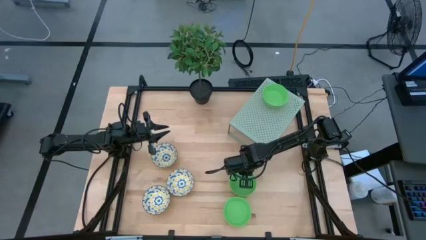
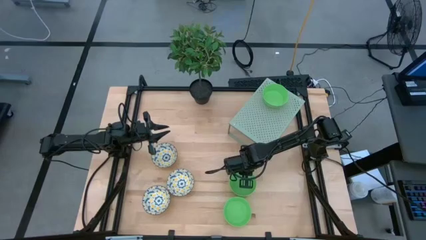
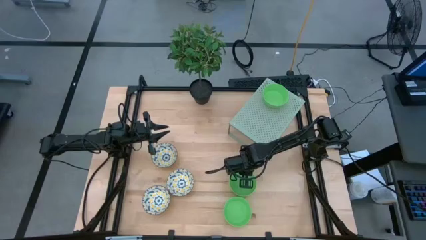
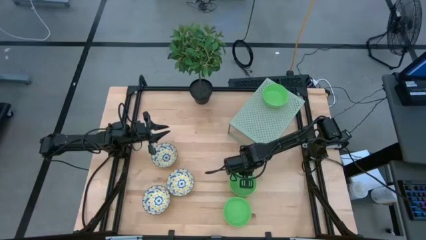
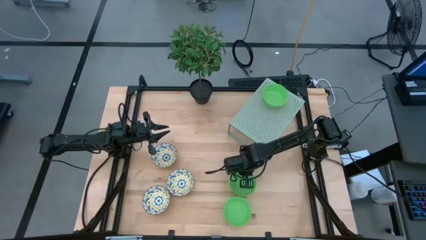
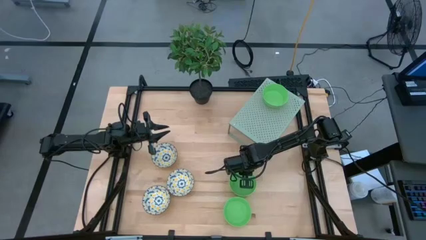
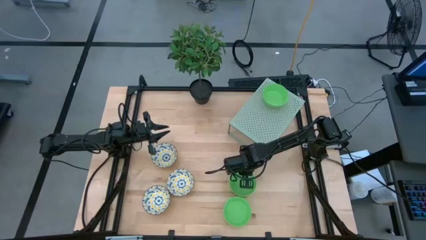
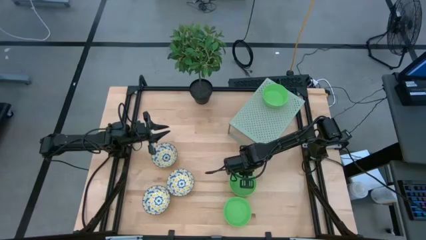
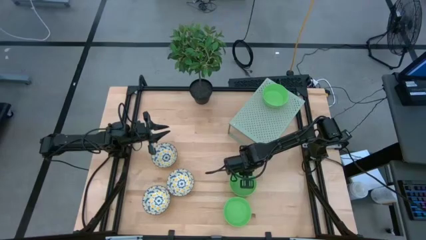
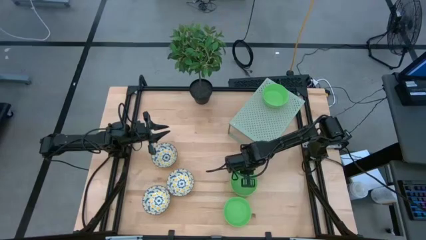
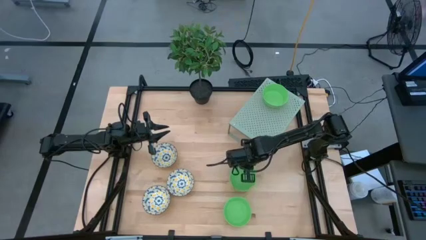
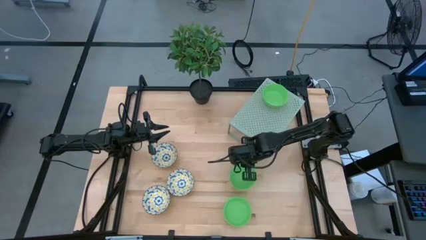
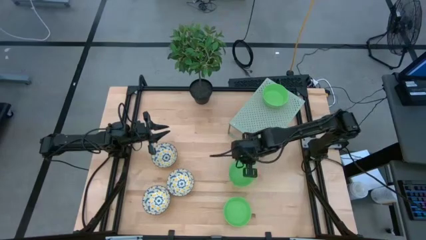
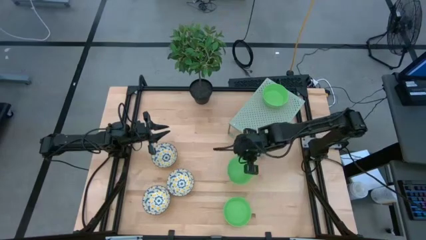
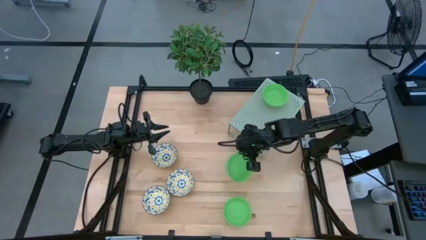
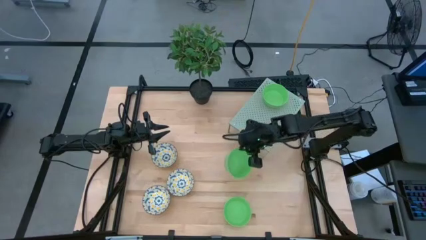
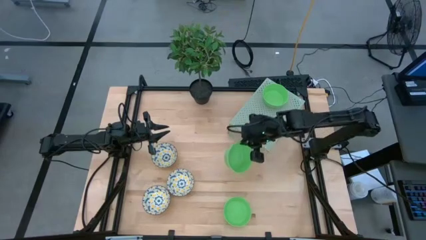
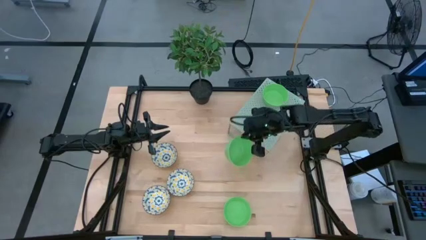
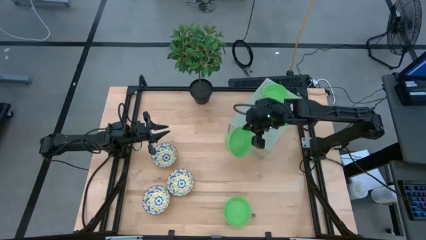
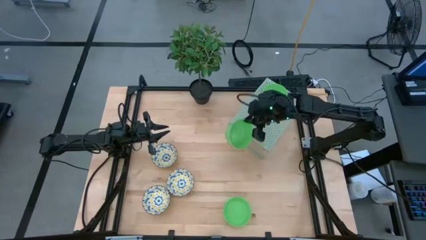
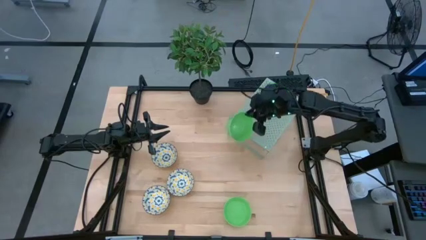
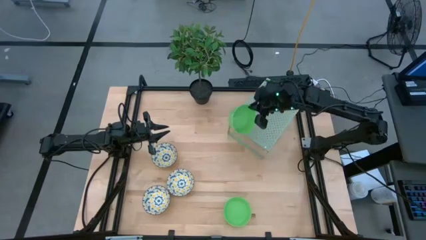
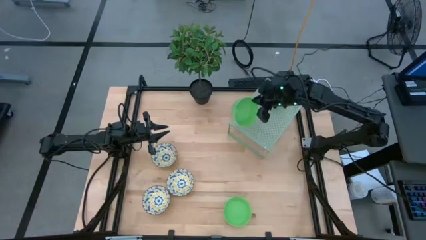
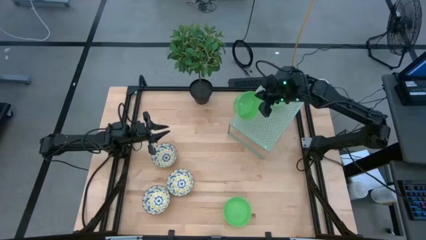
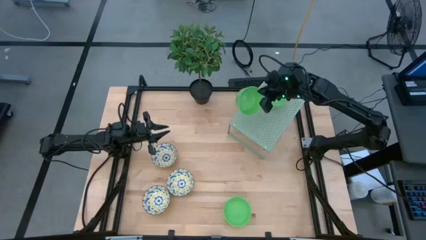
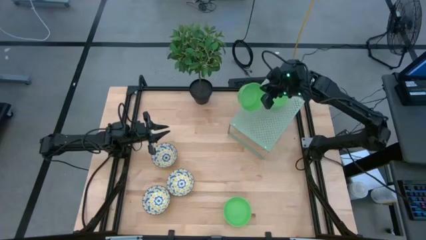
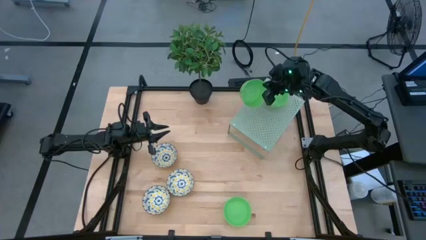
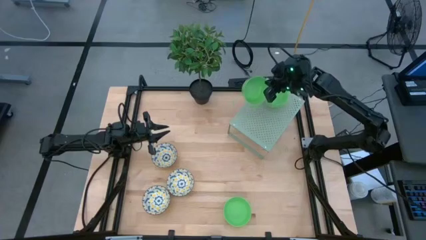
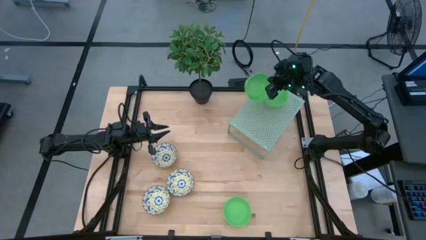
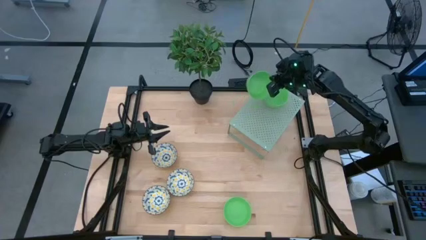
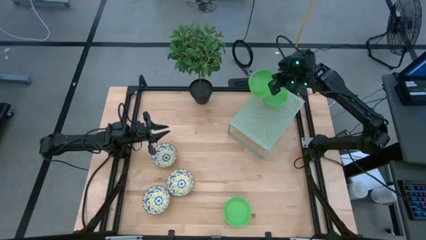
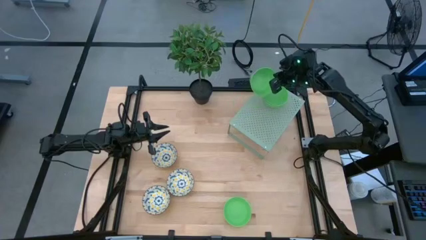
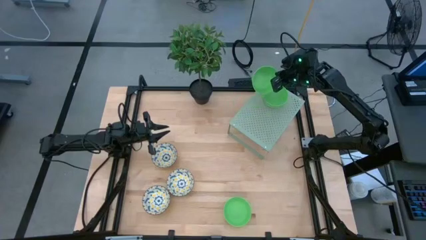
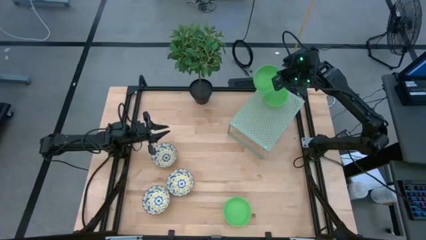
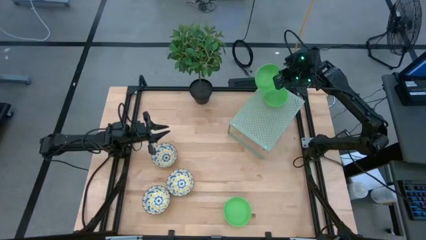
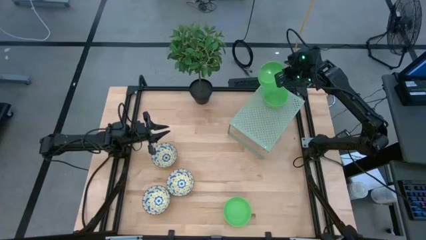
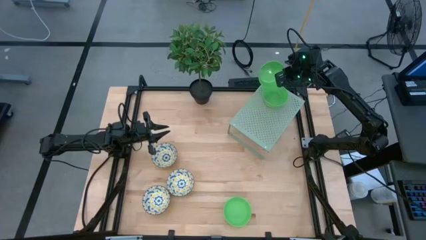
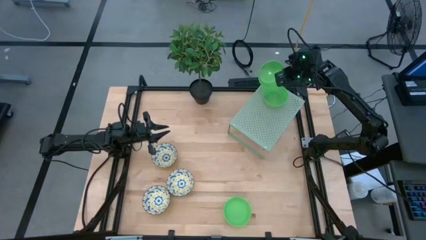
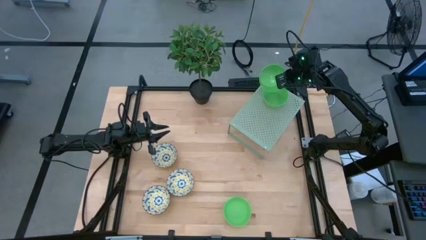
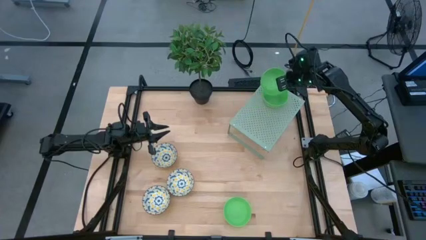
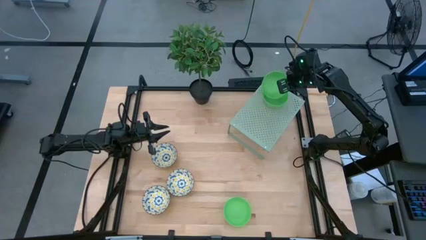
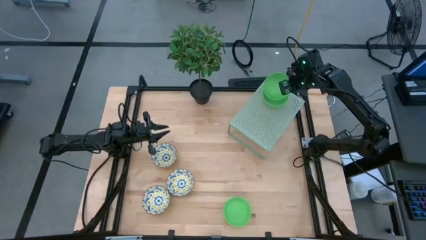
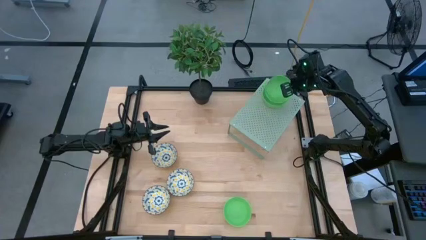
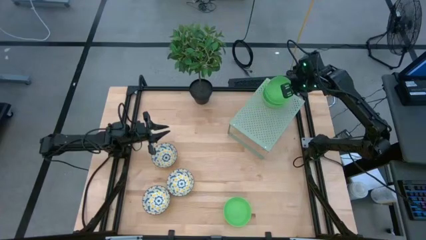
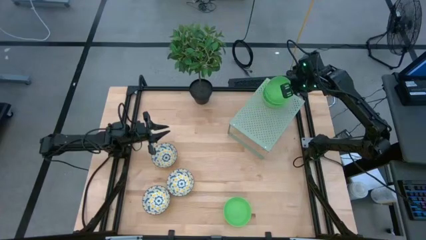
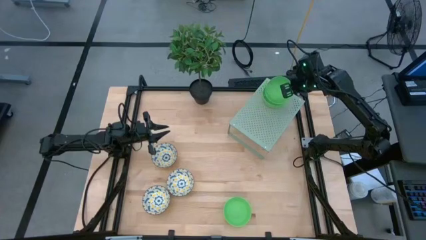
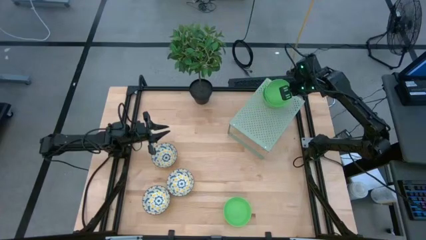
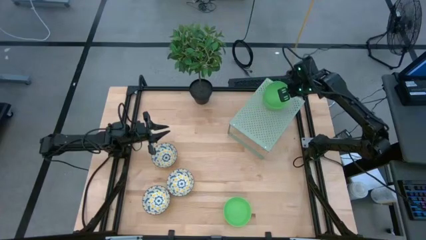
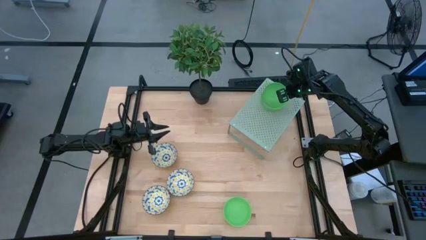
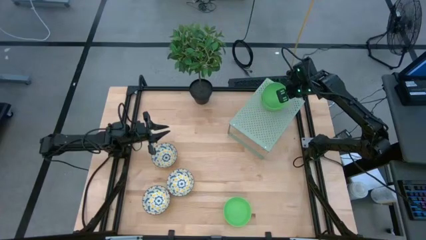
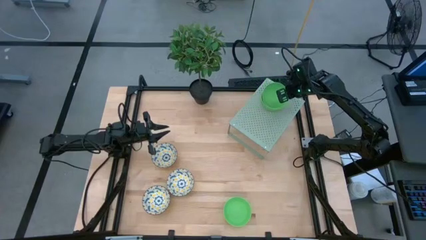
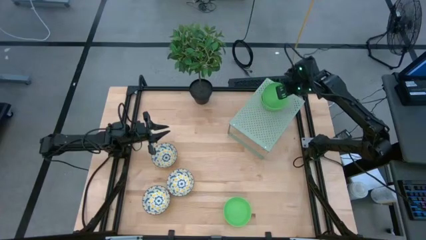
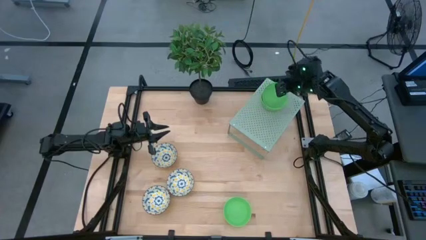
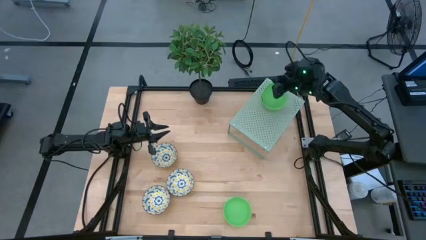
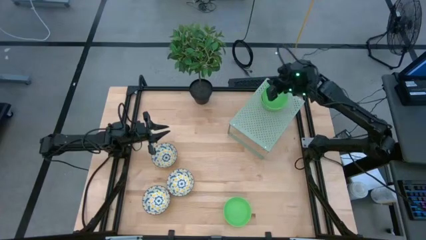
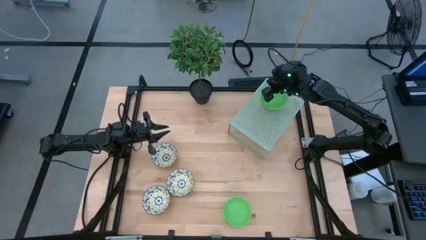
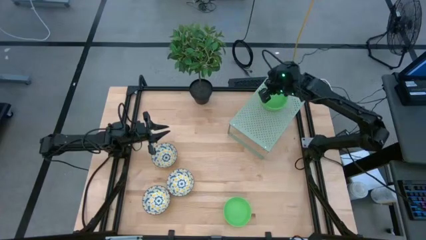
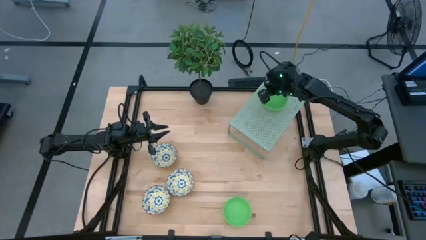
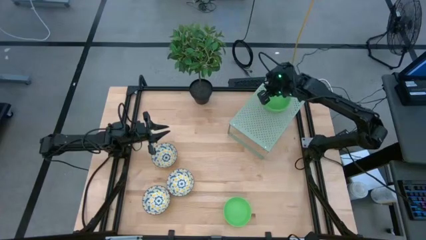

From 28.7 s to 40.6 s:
Task: Pick & Place Mini bowls
Stack the top green bowl on the green bowl on the shelf
